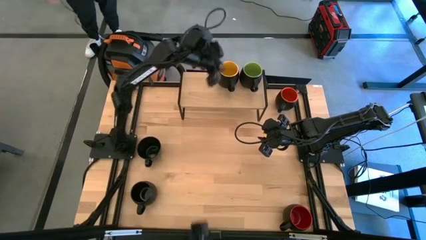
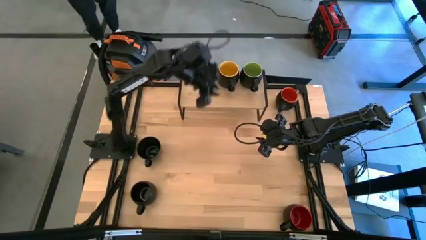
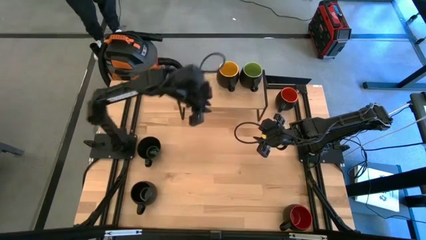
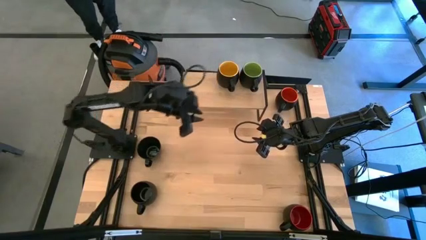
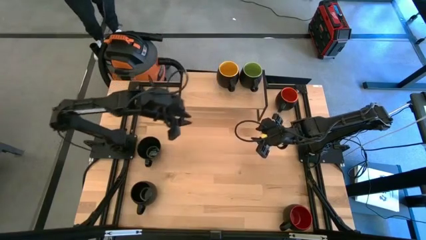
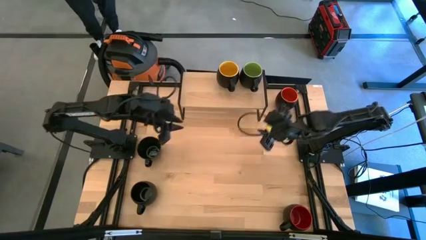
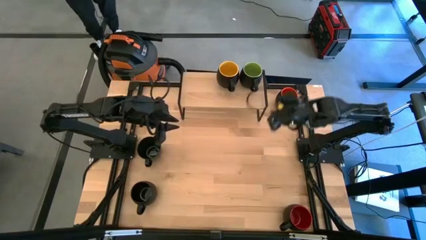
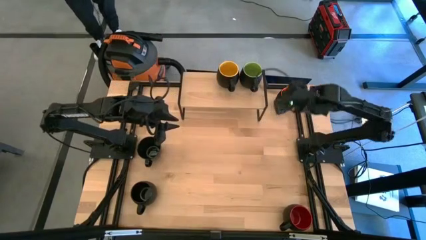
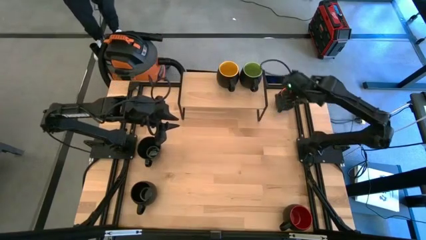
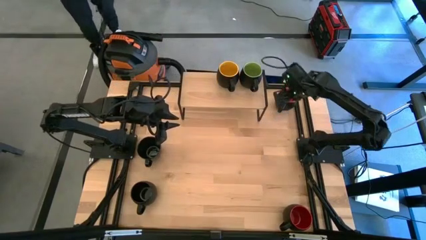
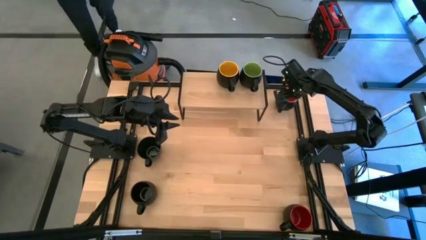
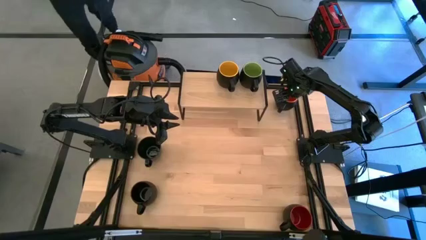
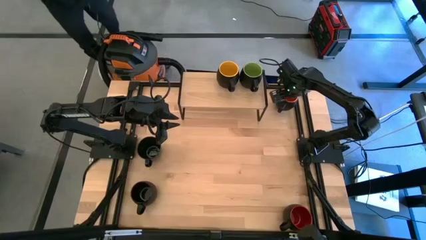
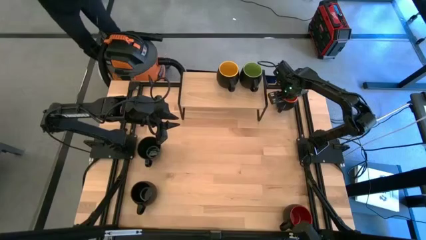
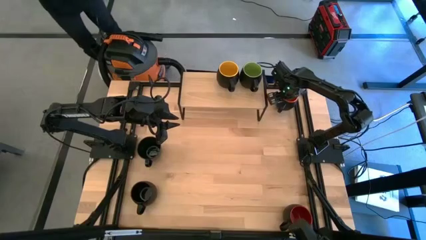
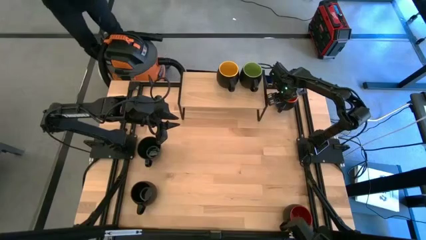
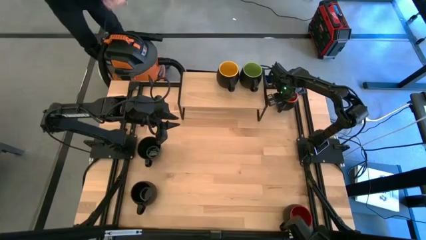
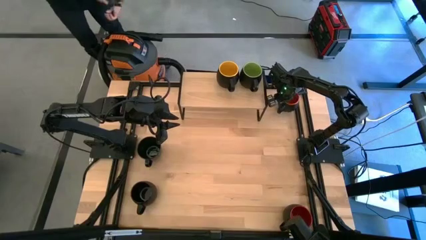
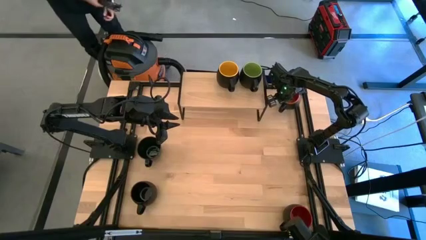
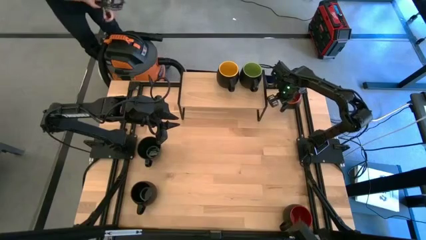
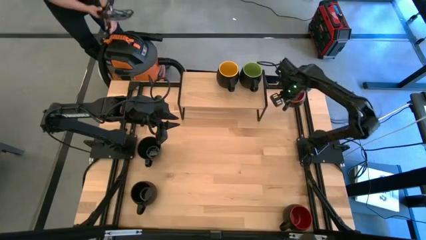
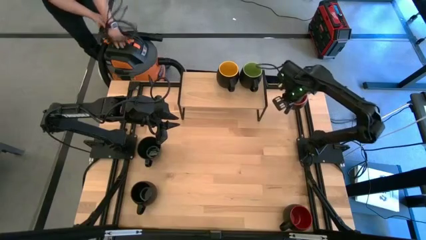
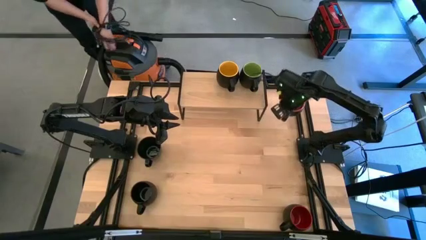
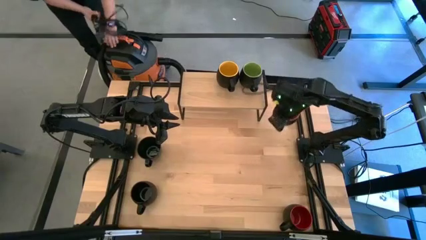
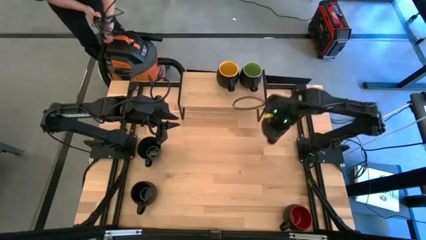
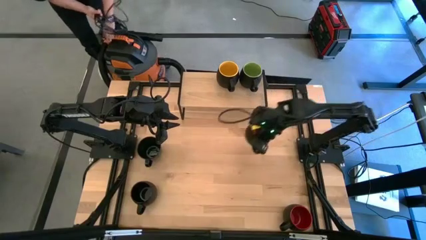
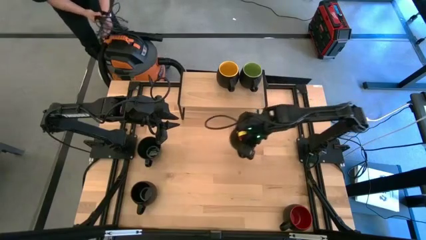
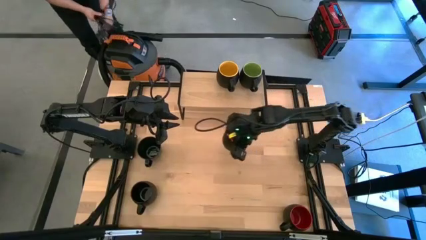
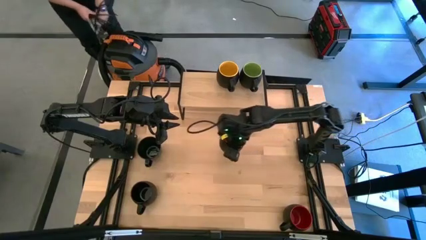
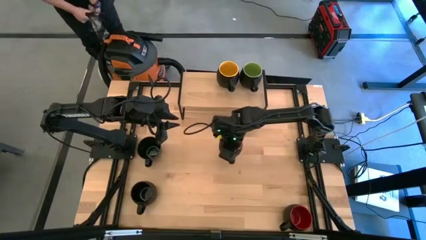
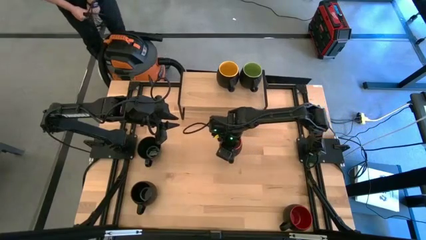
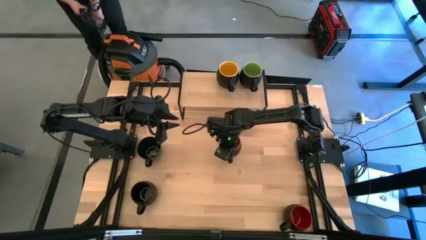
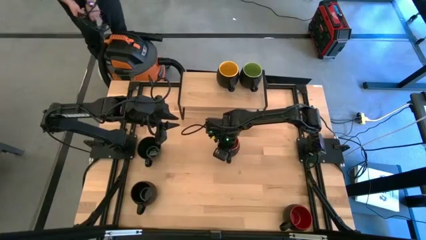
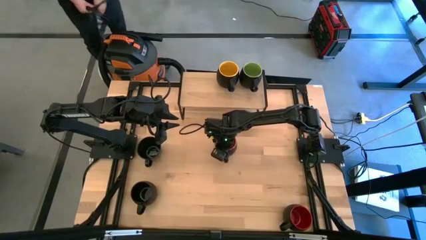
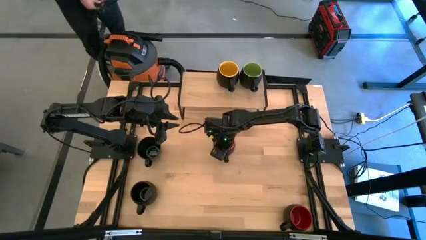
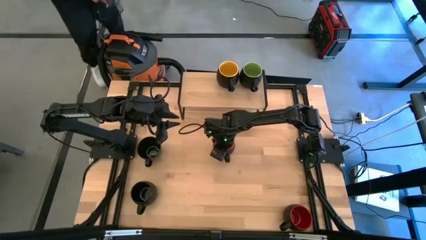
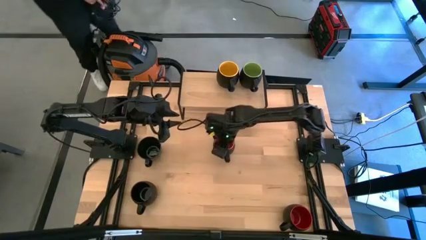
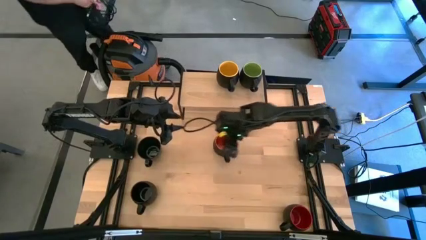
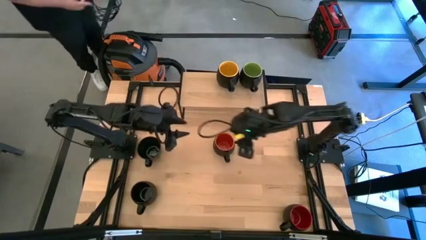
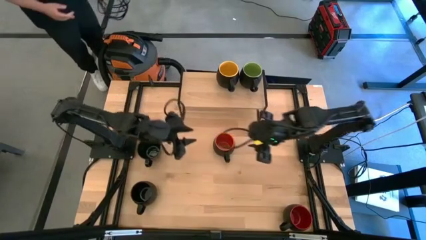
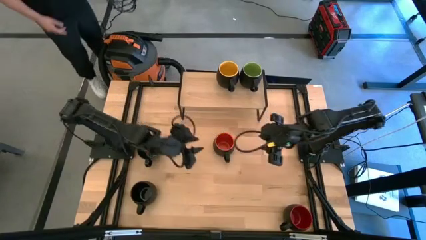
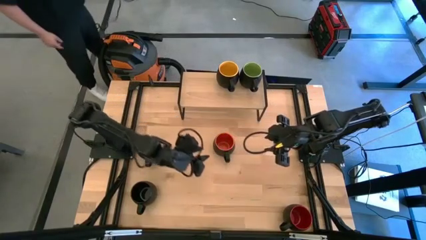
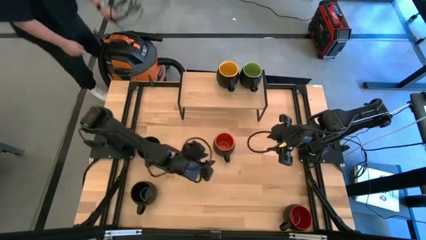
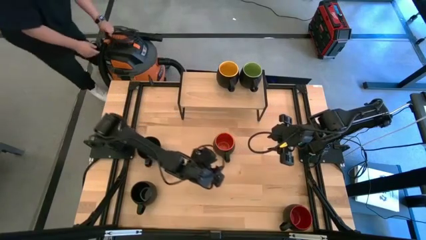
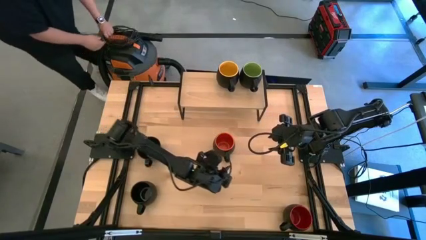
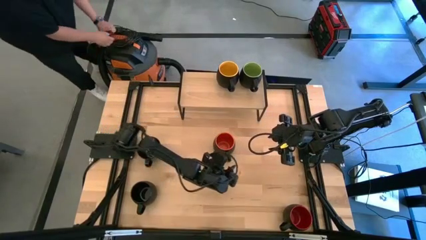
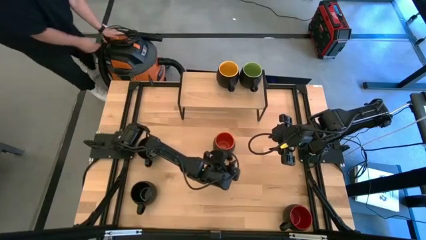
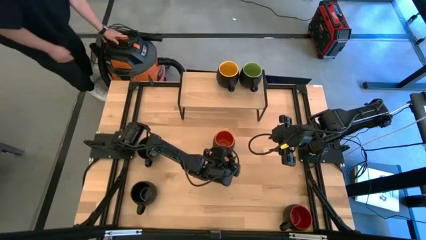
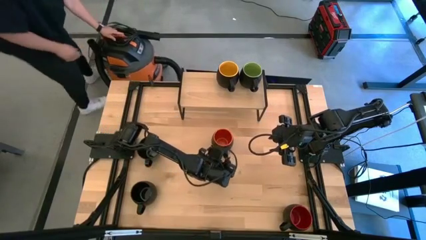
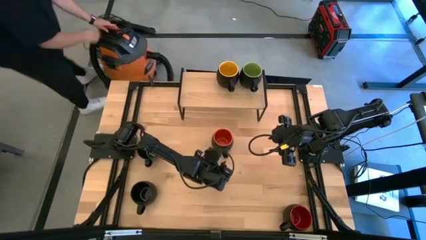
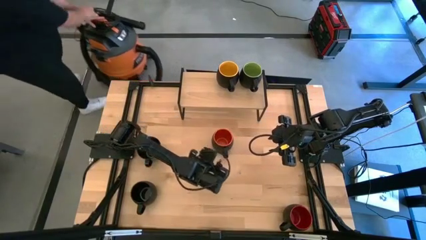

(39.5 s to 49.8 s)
Task: Place coffee mugs
Put the orange mug on the shelf

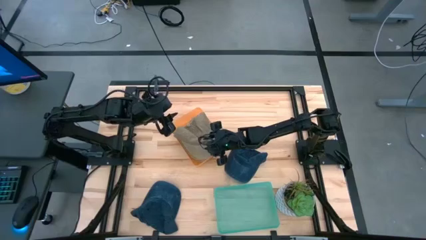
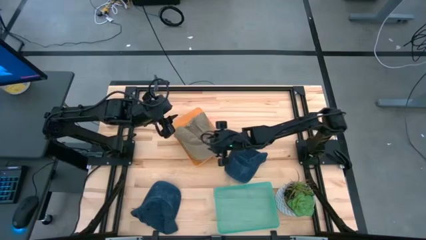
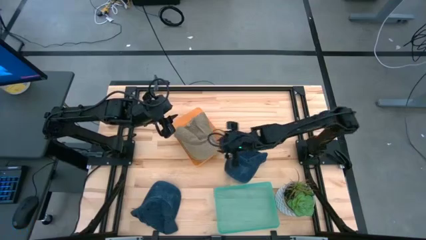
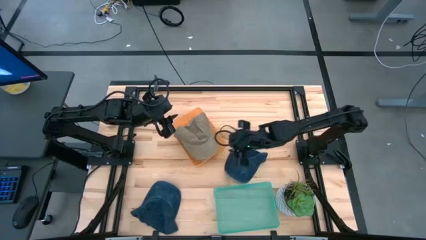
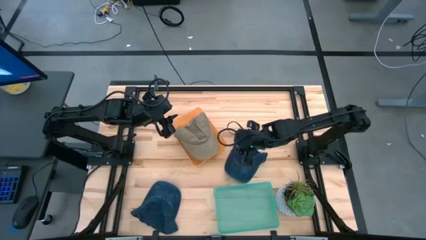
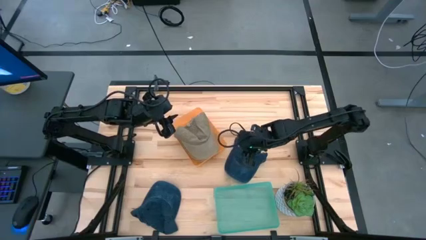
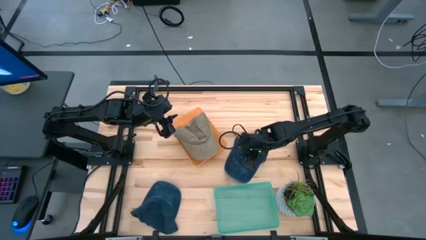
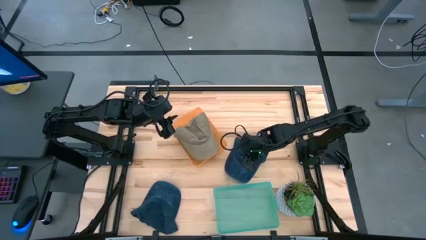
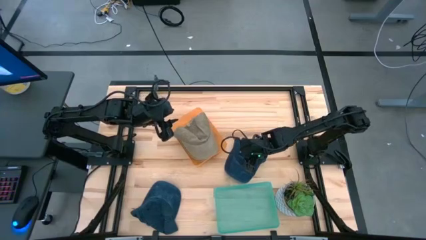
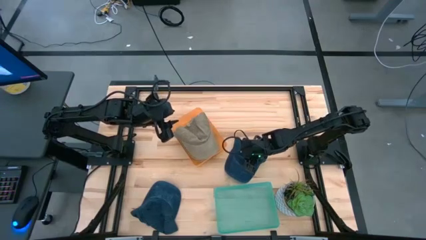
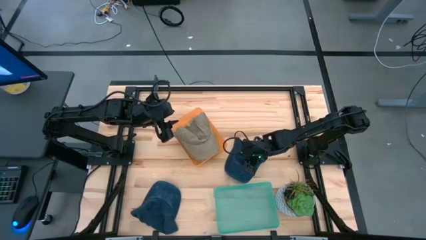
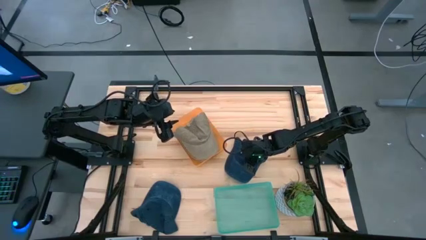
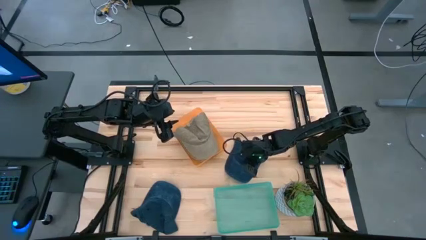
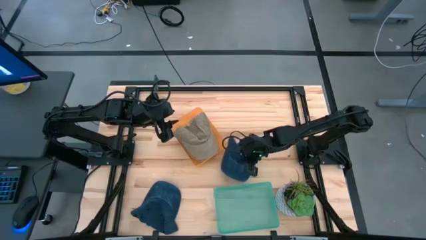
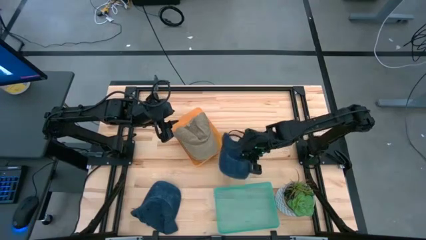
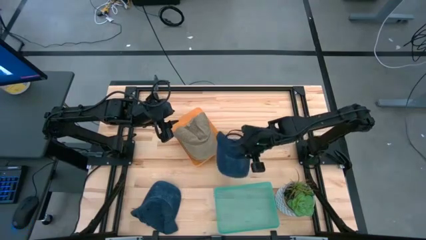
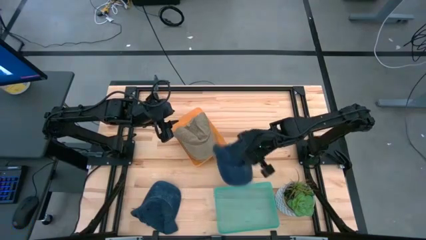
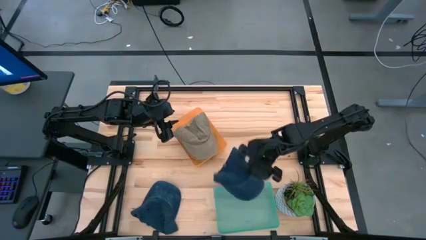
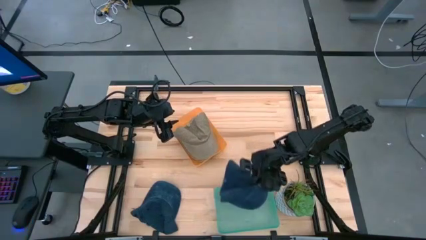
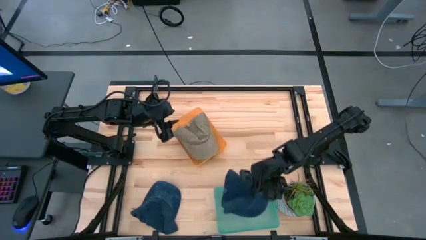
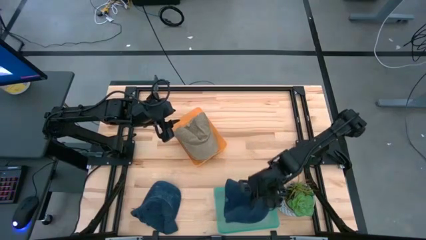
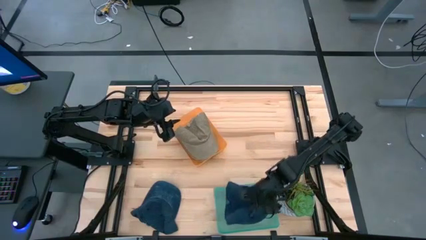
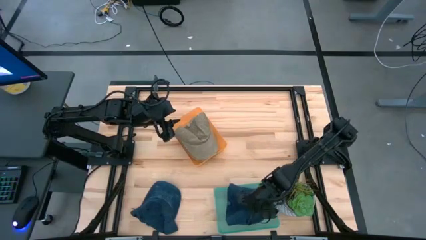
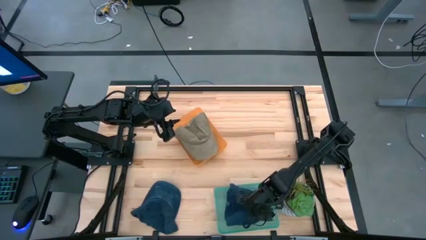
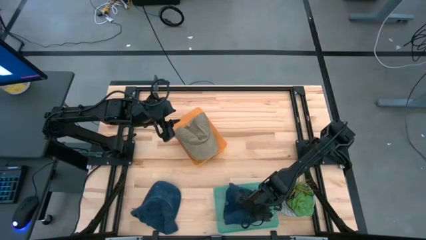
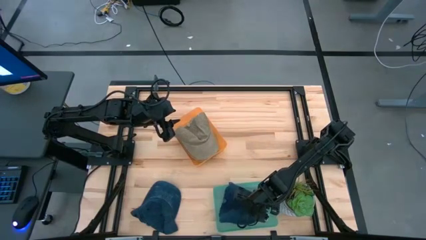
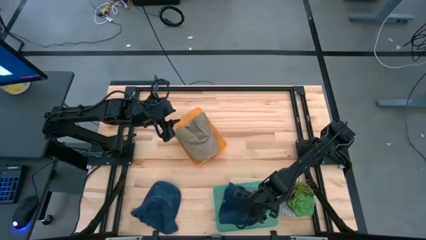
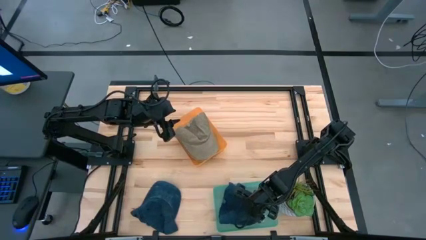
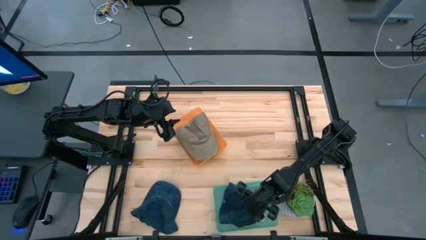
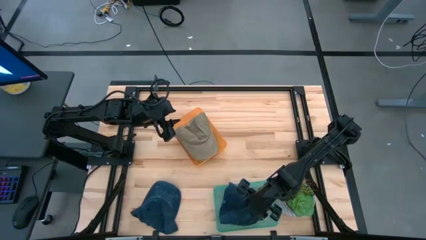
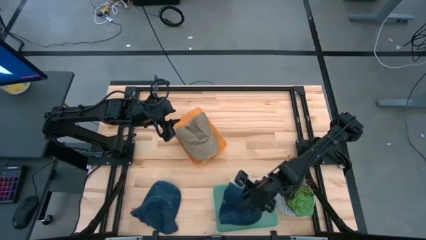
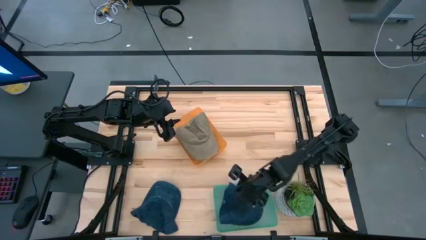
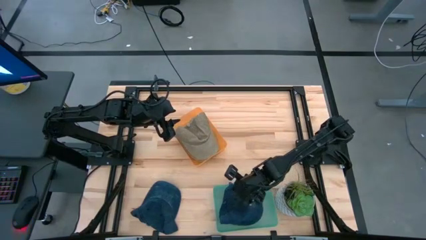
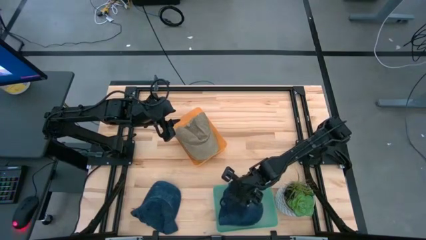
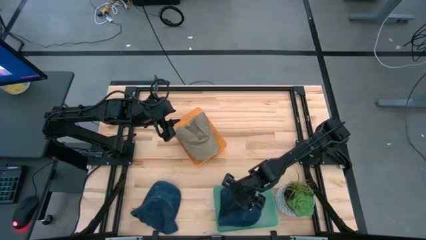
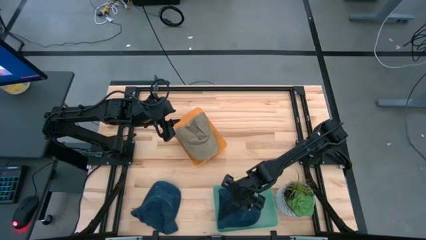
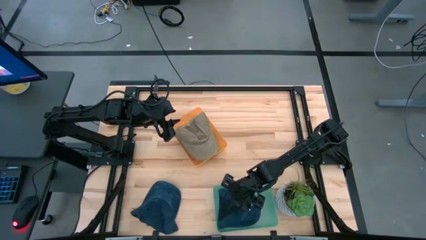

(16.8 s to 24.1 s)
Task: Pick & Place hat
Put the right blue cap into the green bin
